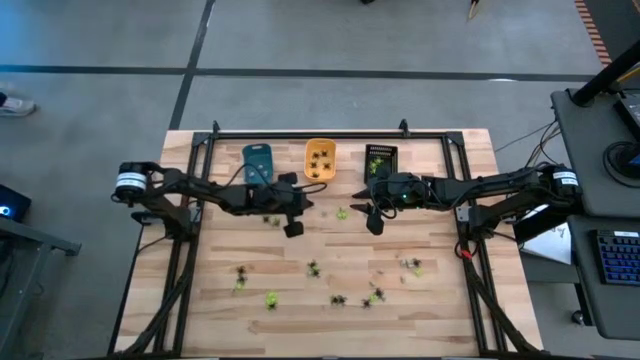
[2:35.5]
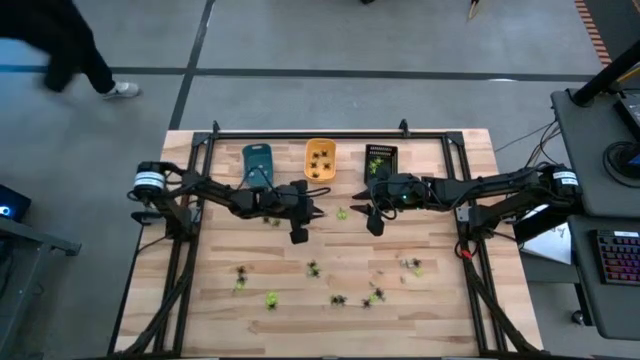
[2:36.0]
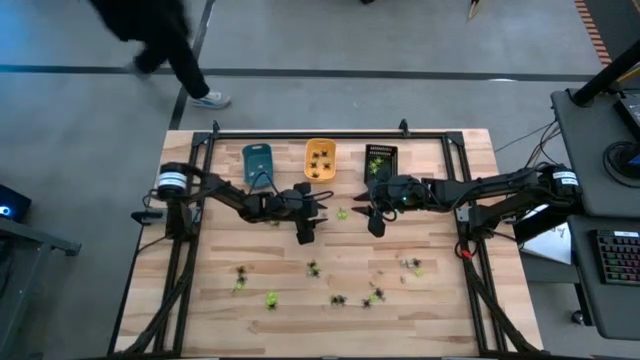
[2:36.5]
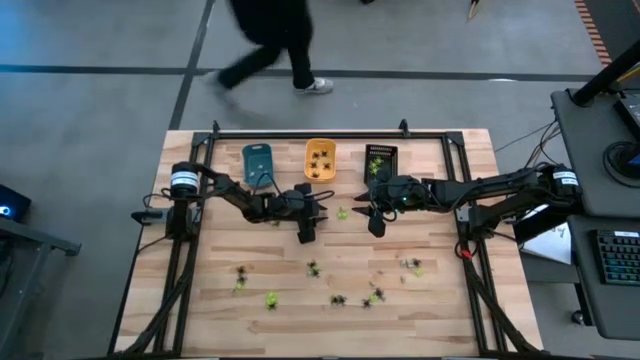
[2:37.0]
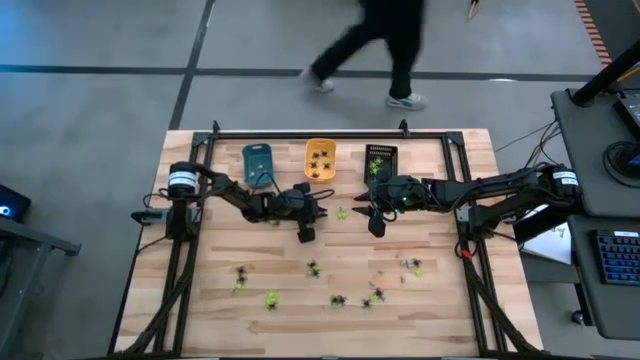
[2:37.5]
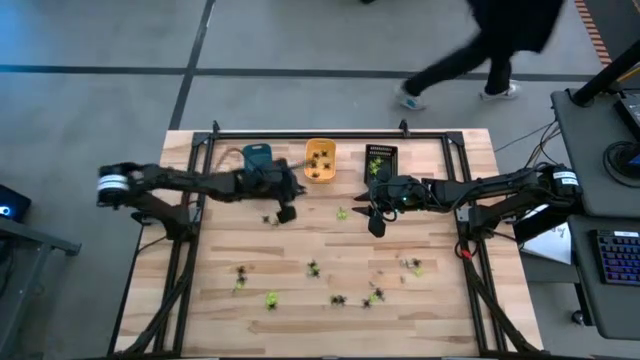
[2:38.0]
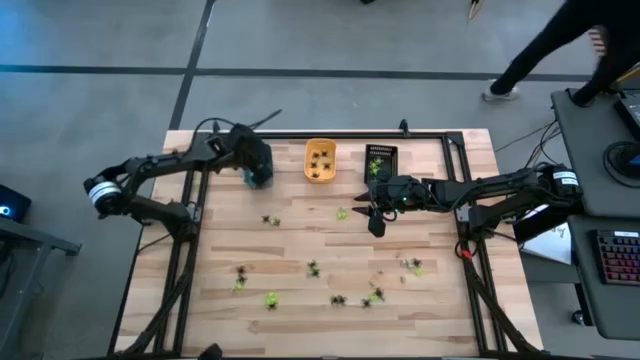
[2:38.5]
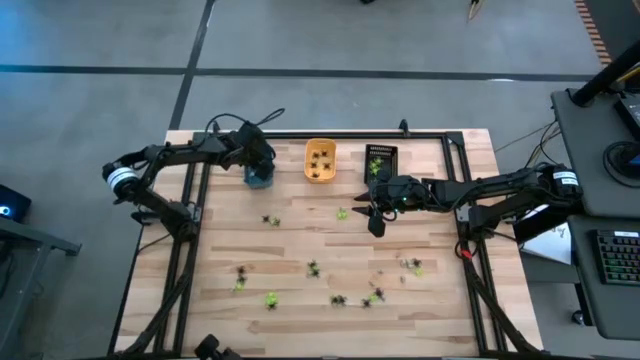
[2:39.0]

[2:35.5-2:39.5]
Task: Sort Halloween decoration
Put the white skull toy into the blue bin

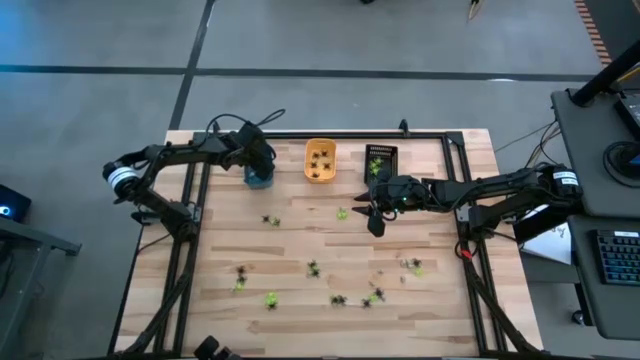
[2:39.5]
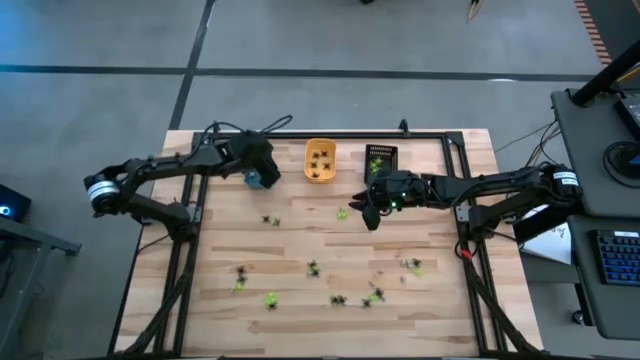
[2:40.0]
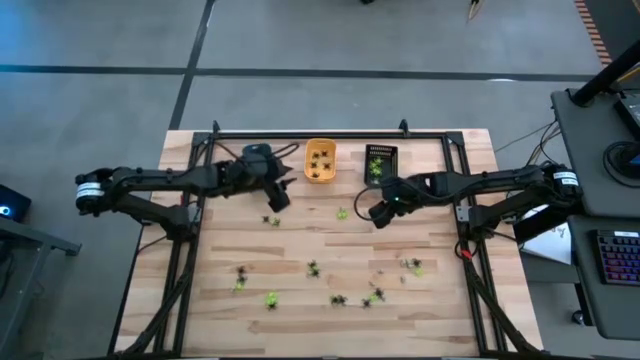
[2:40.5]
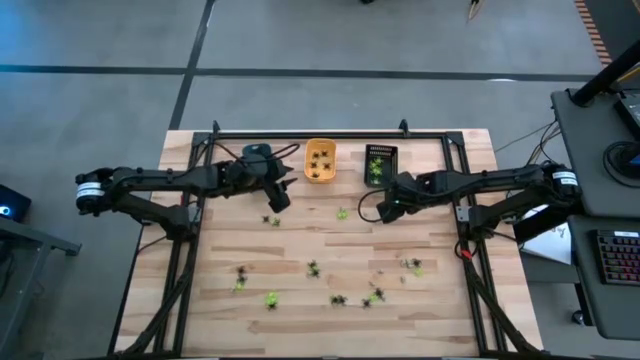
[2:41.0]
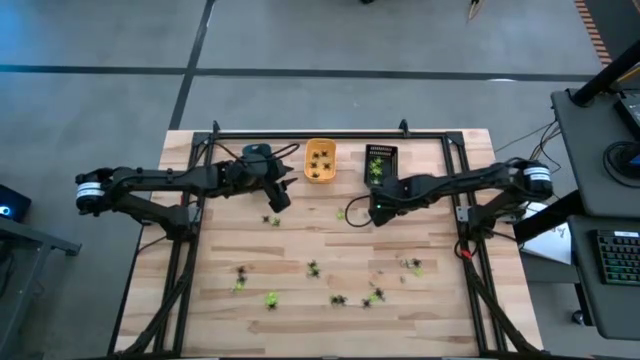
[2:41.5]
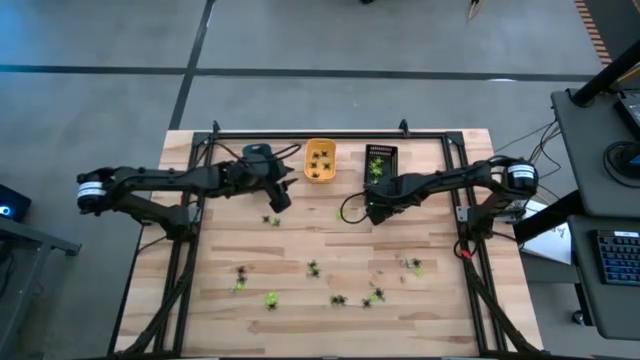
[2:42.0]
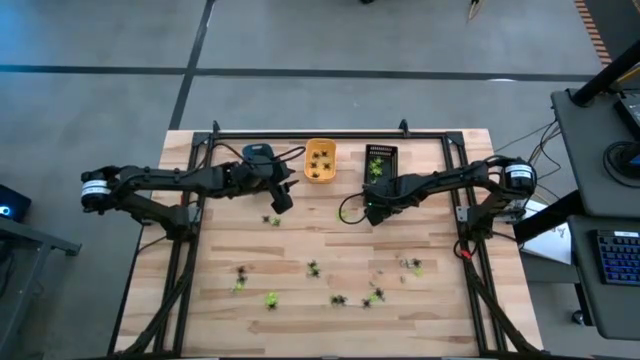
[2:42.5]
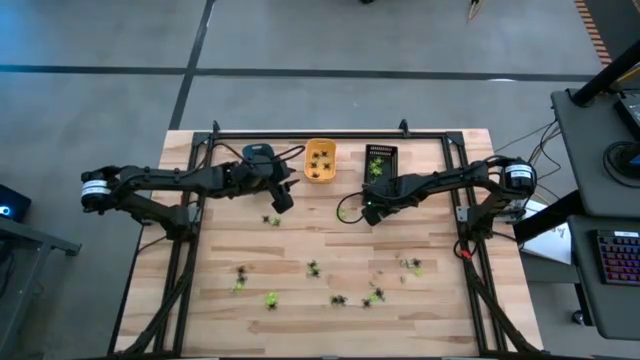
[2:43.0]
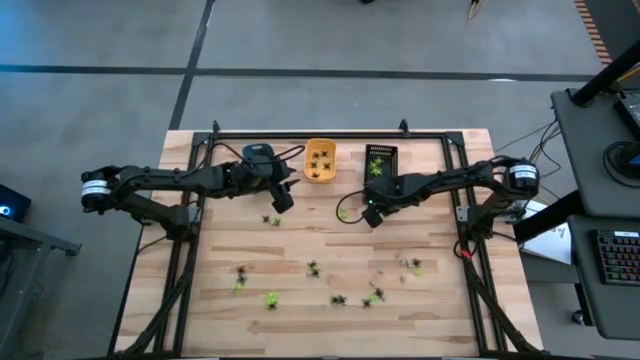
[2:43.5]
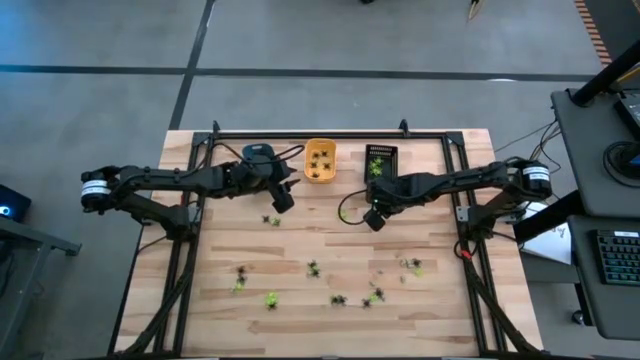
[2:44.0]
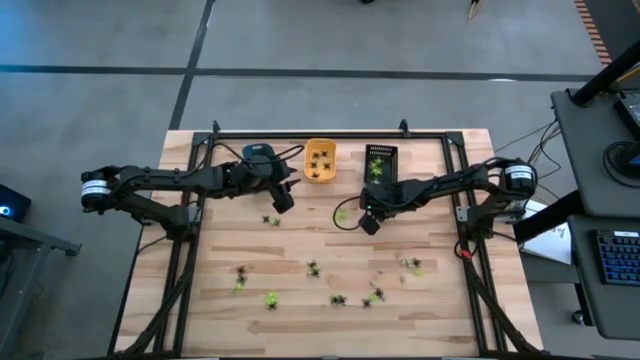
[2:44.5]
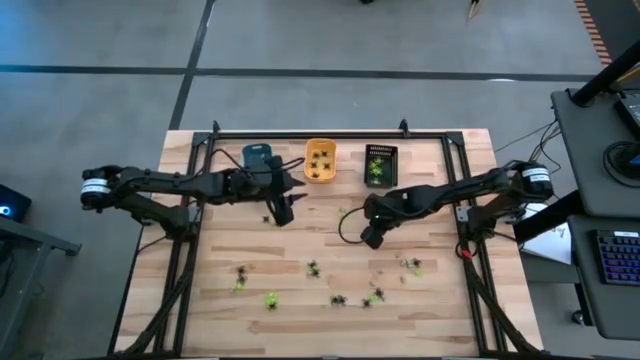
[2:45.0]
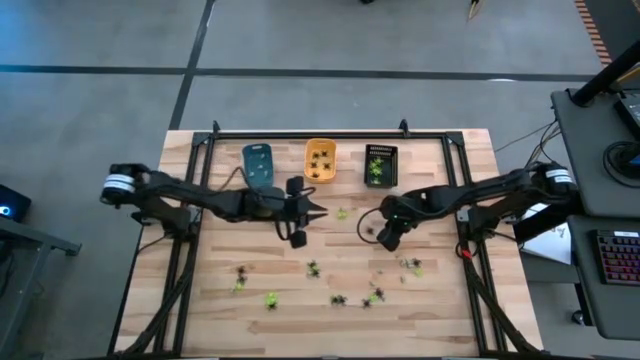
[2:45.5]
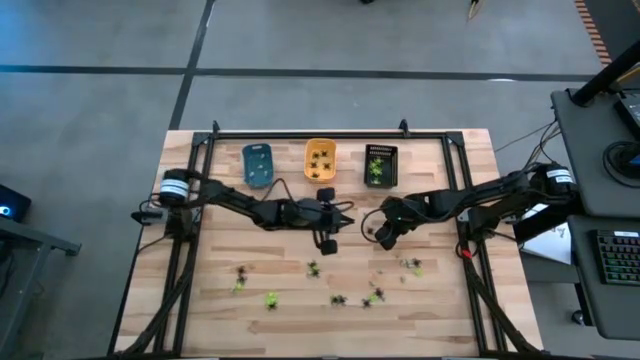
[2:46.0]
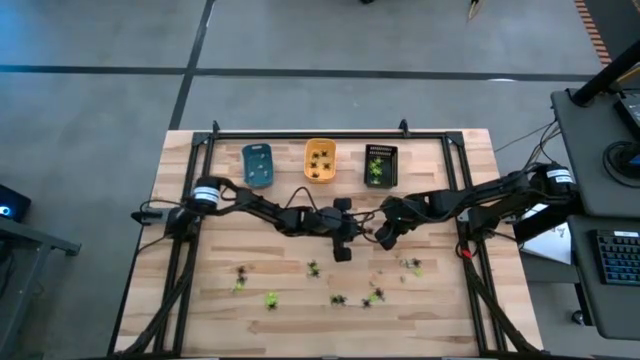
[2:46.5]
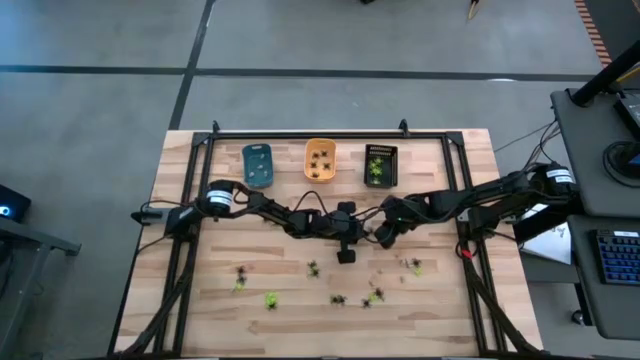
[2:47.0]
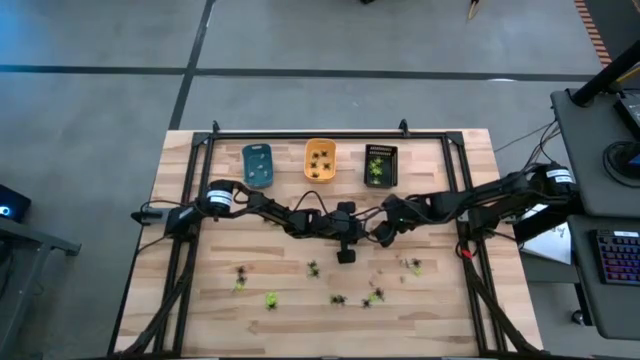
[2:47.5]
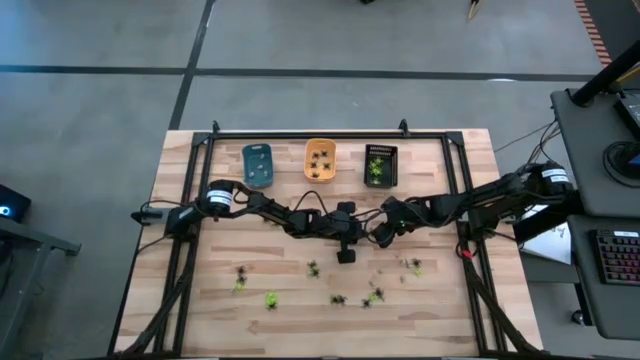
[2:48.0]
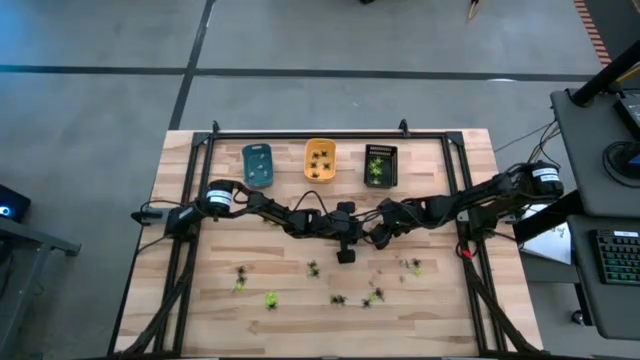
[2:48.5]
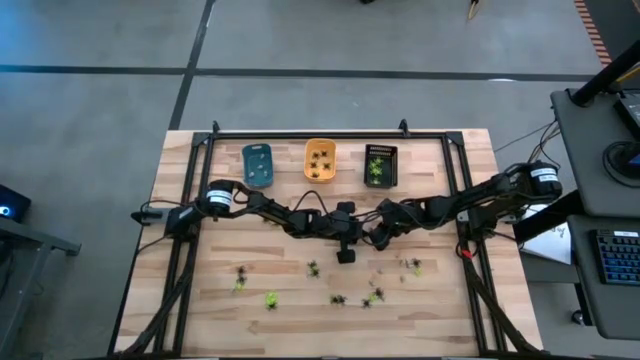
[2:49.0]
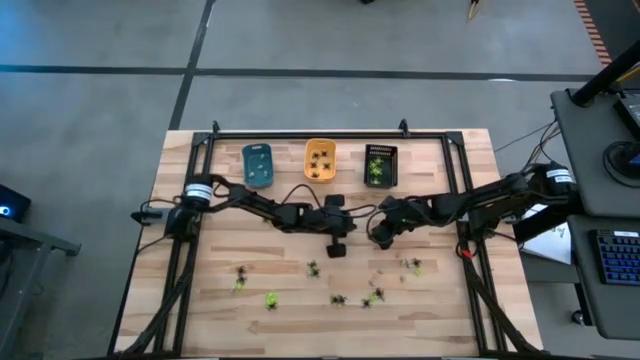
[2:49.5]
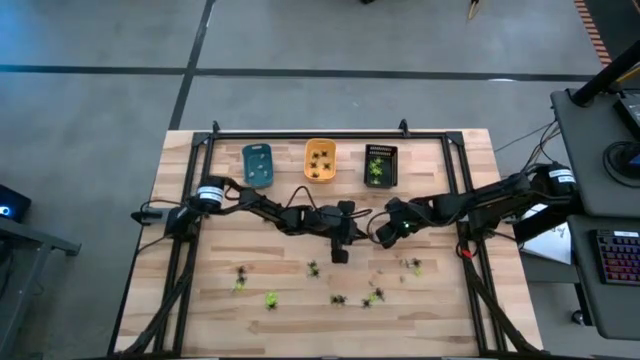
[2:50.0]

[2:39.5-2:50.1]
Put the black spider toy into the orange bin

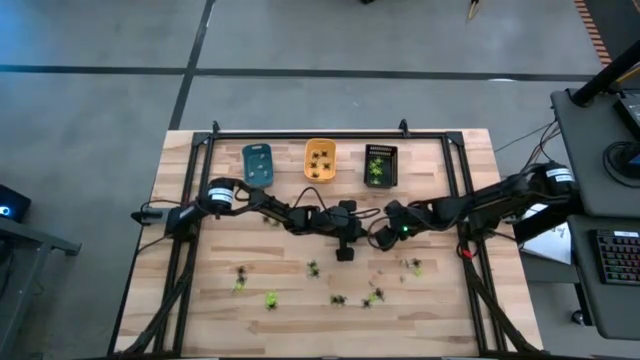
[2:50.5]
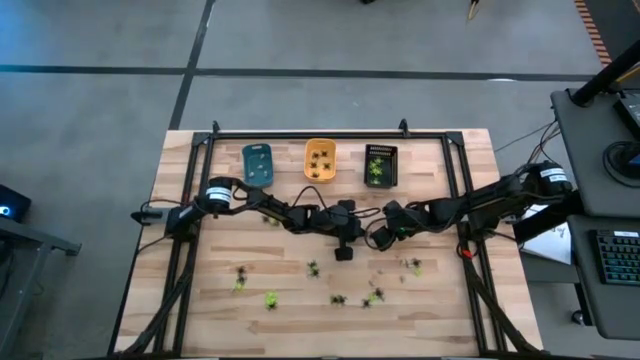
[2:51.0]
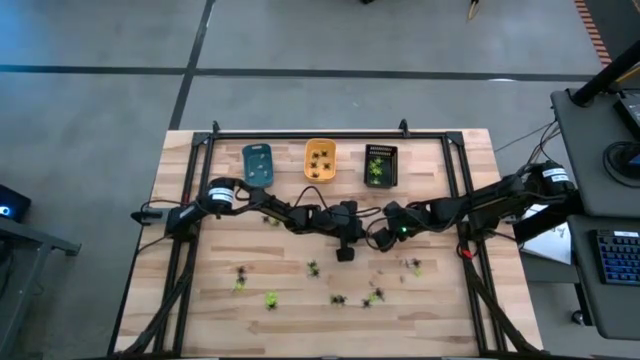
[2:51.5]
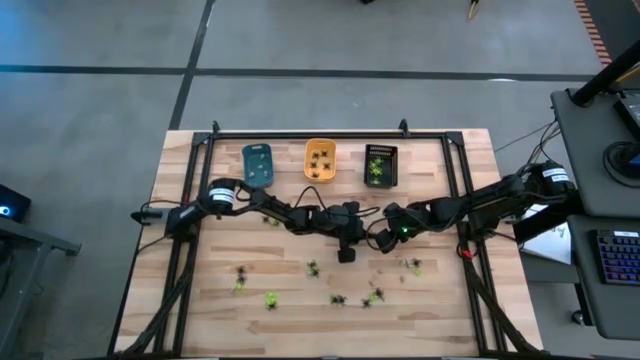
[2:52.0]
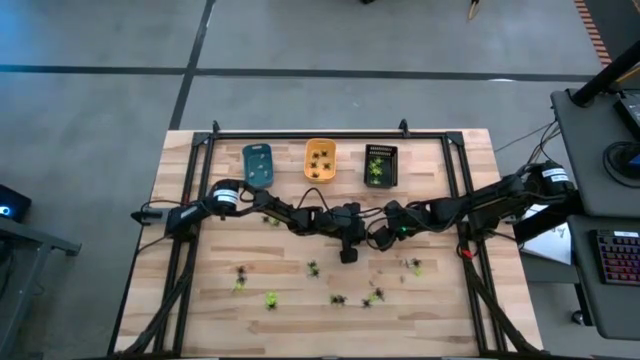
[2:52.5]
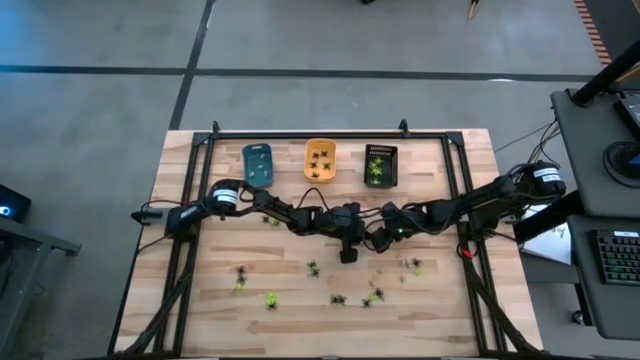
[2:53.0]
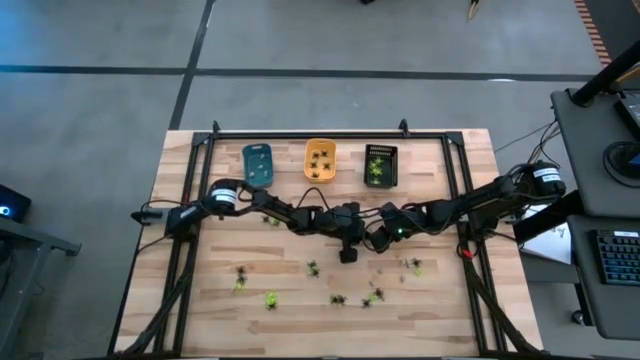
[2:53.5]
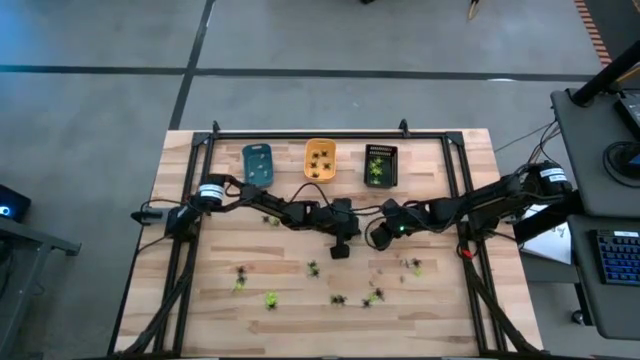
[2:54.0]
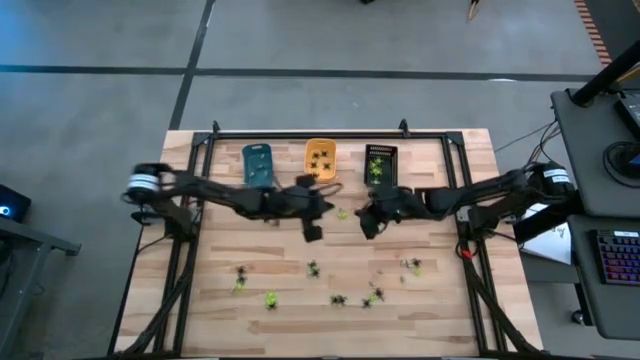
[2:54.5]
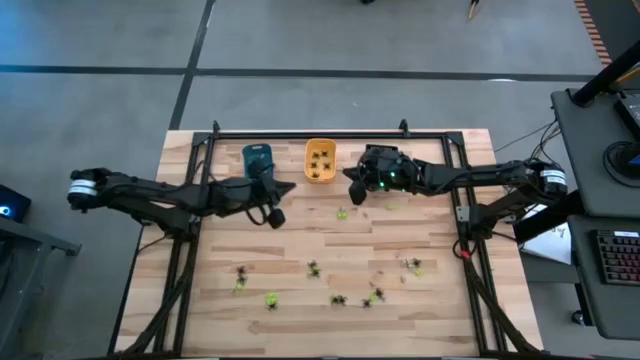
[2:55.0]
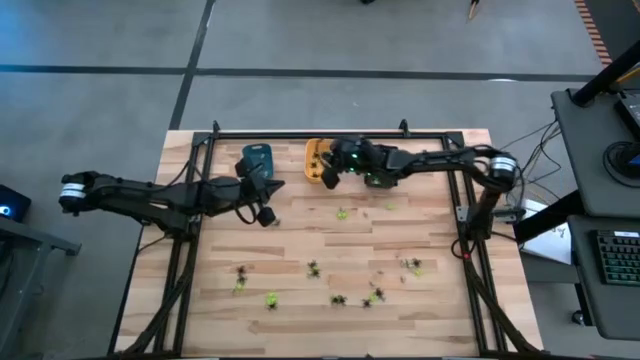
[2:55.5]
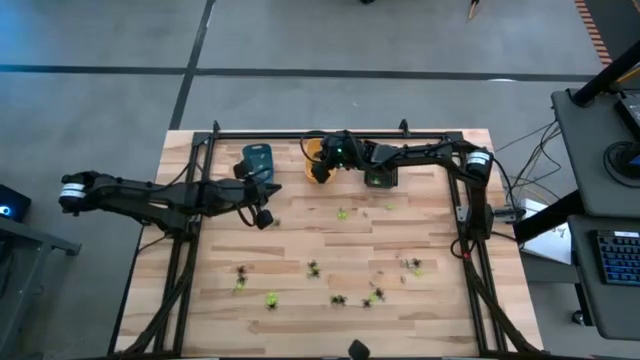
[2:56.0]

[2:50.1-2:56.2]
Put the black spider toy into the orange bin
